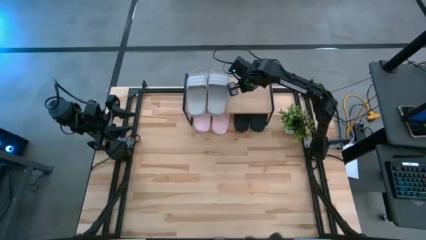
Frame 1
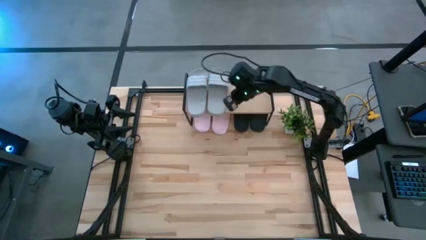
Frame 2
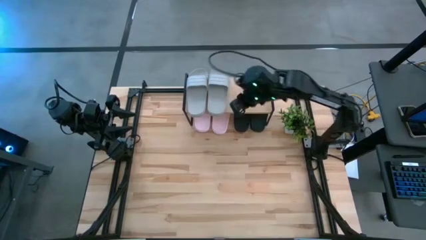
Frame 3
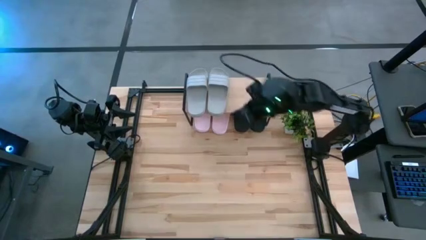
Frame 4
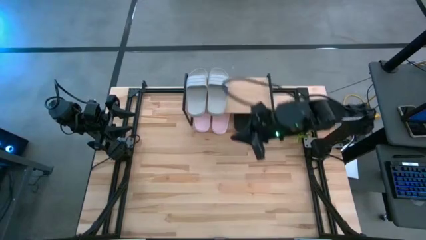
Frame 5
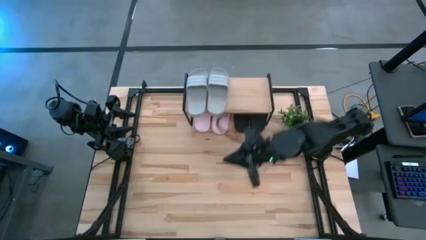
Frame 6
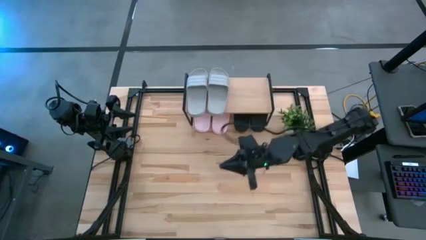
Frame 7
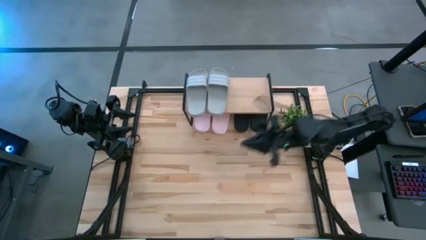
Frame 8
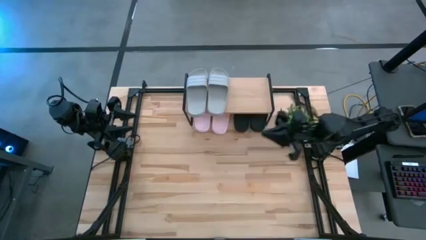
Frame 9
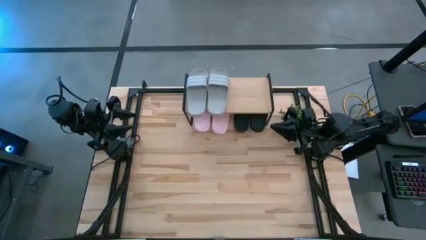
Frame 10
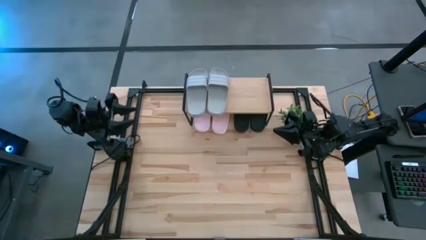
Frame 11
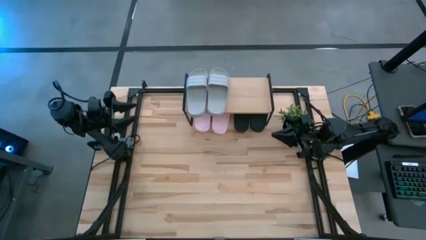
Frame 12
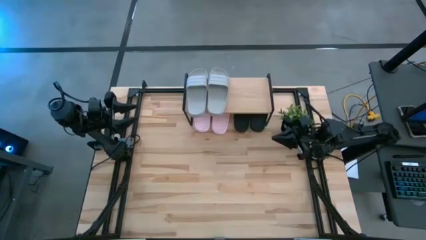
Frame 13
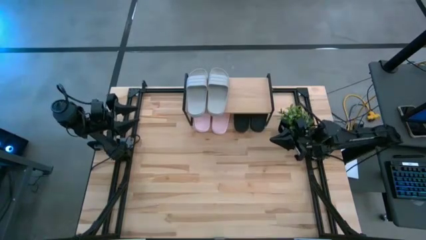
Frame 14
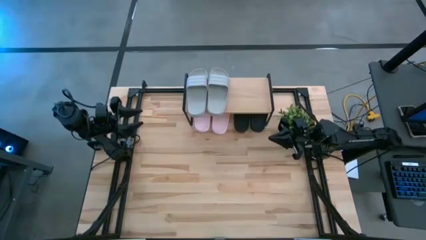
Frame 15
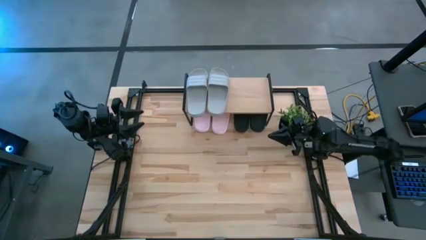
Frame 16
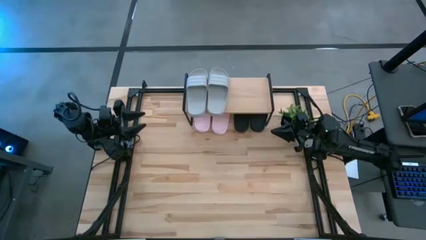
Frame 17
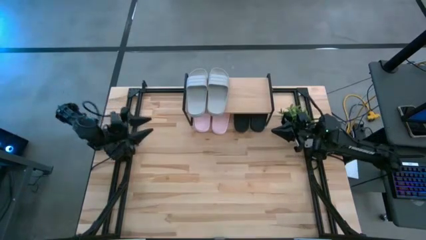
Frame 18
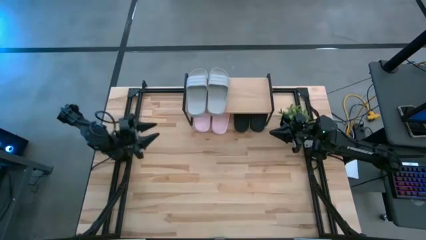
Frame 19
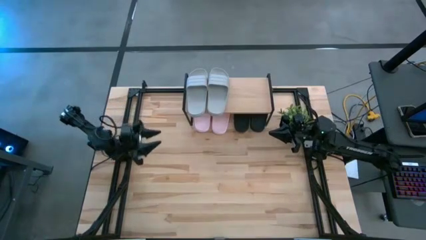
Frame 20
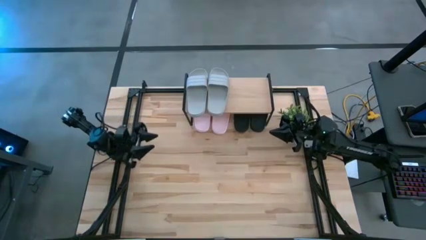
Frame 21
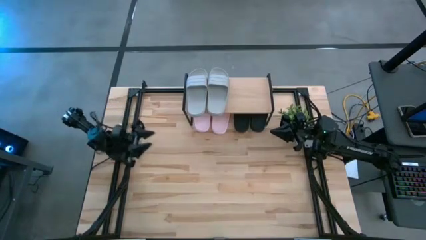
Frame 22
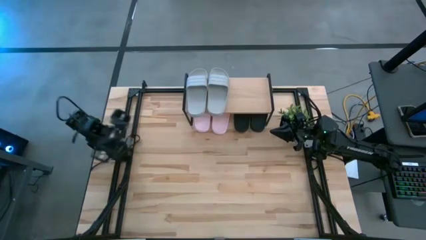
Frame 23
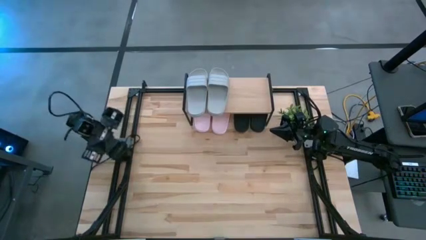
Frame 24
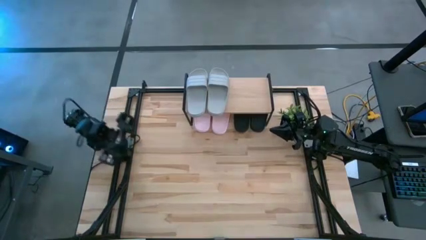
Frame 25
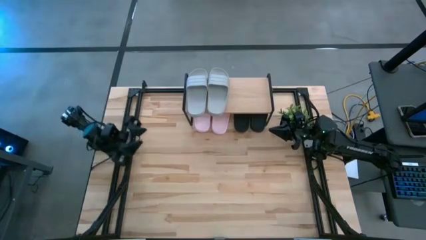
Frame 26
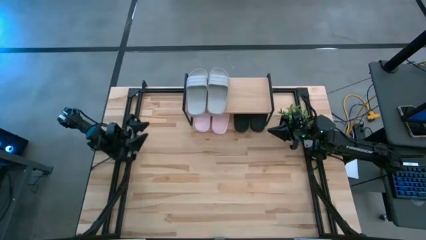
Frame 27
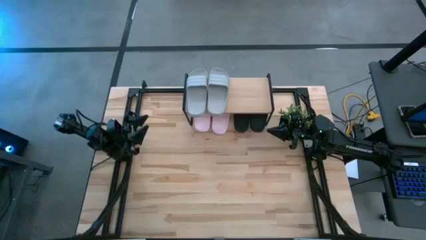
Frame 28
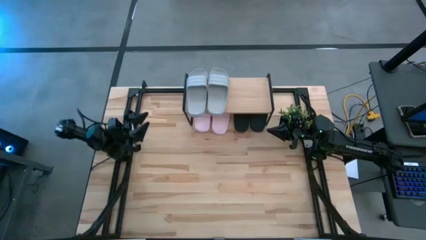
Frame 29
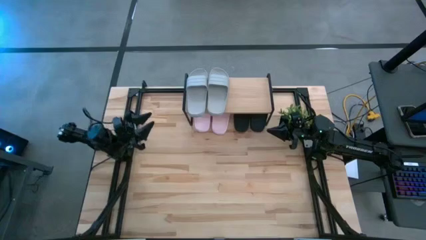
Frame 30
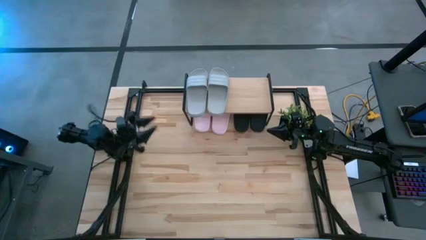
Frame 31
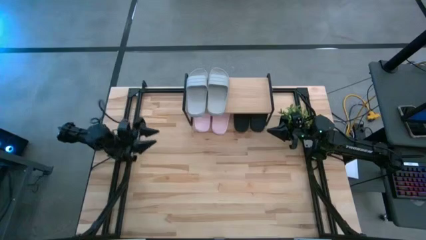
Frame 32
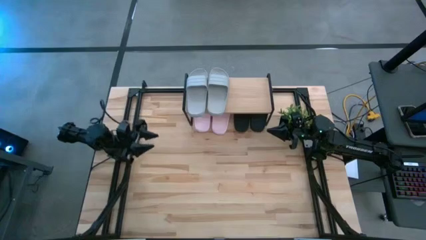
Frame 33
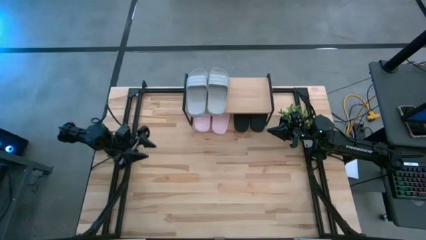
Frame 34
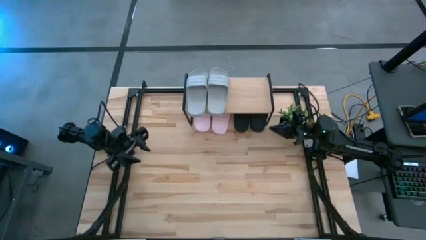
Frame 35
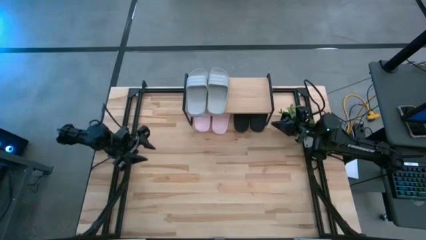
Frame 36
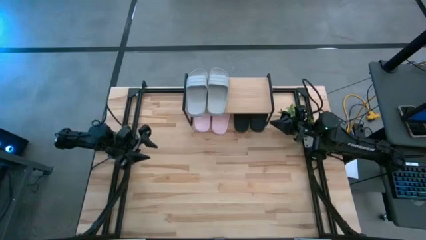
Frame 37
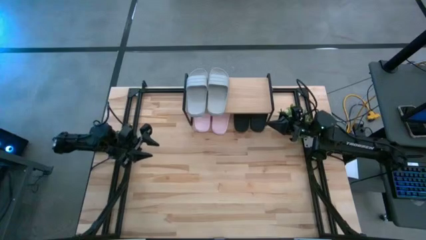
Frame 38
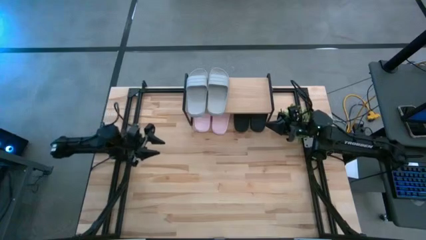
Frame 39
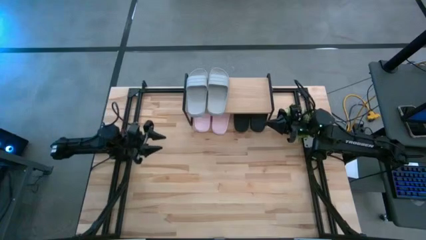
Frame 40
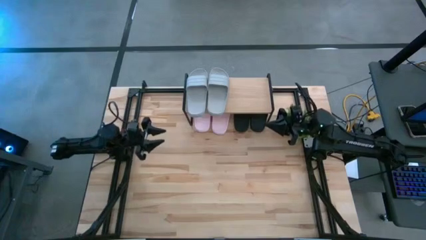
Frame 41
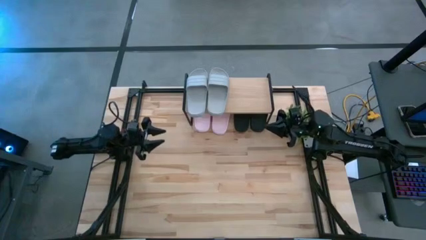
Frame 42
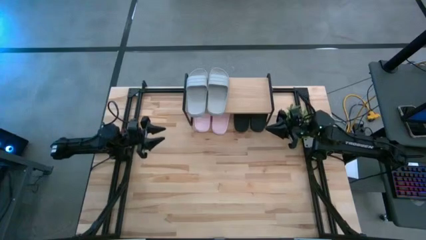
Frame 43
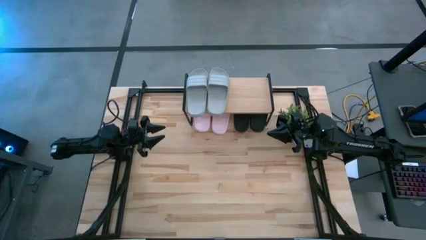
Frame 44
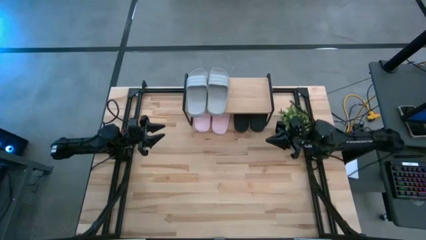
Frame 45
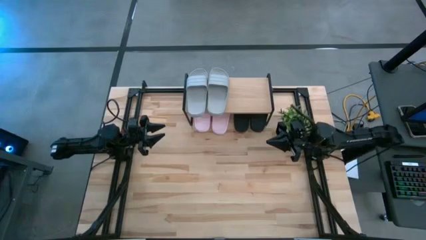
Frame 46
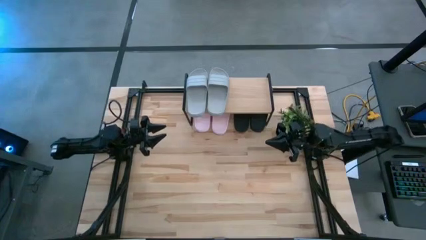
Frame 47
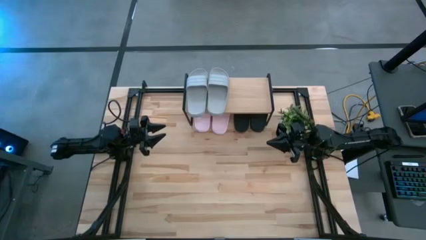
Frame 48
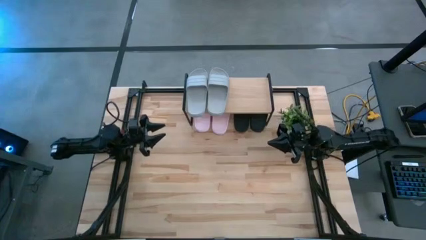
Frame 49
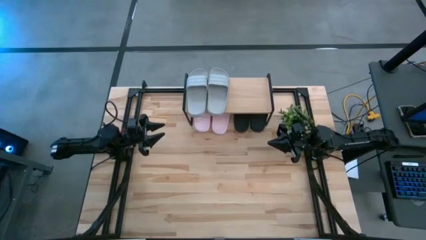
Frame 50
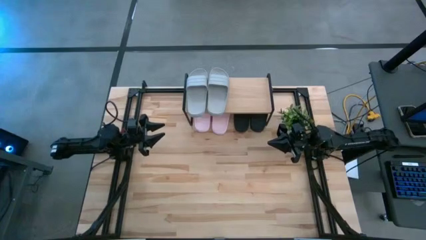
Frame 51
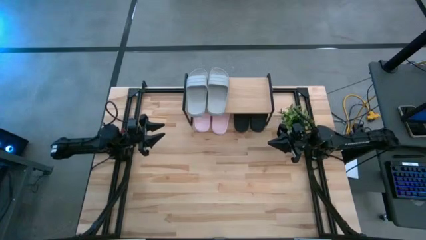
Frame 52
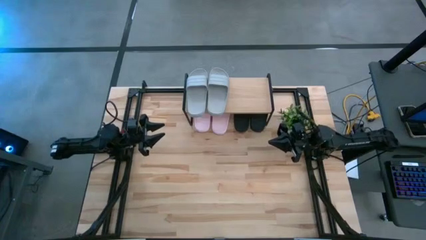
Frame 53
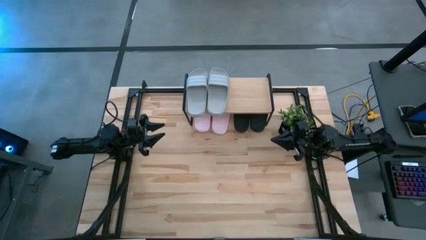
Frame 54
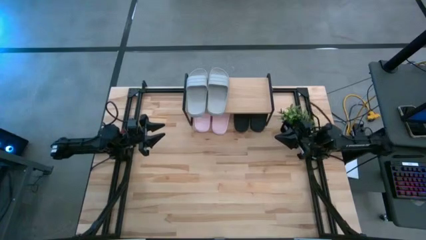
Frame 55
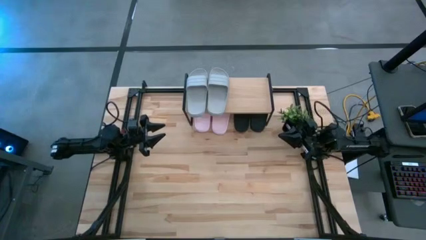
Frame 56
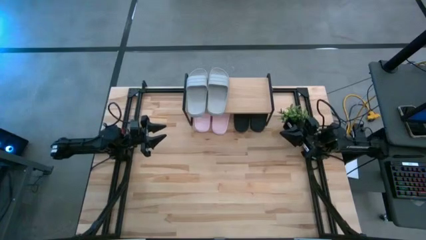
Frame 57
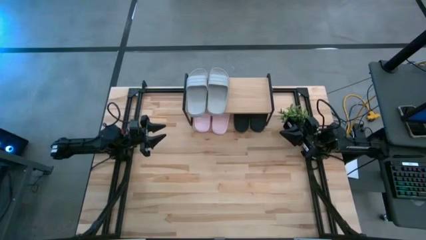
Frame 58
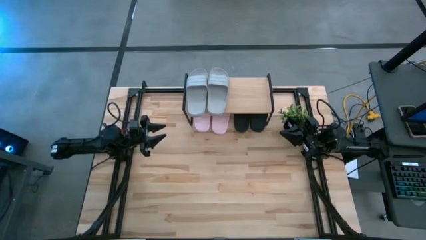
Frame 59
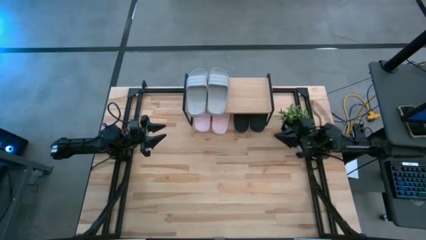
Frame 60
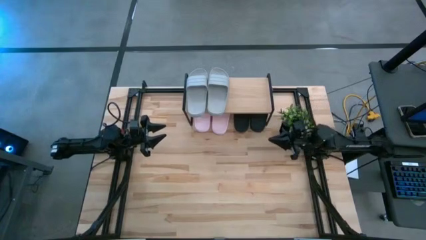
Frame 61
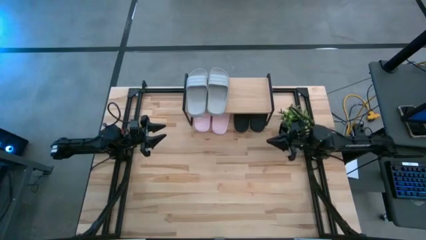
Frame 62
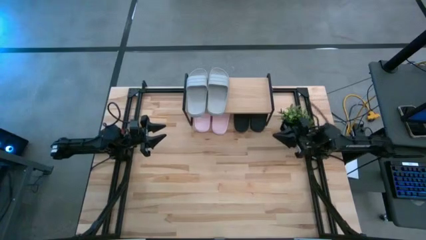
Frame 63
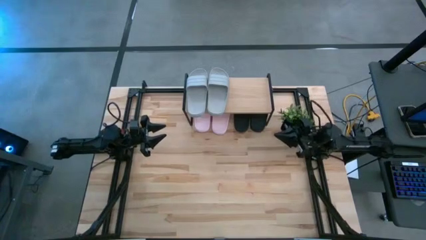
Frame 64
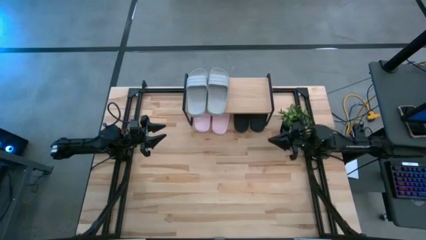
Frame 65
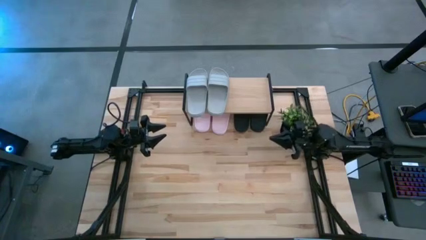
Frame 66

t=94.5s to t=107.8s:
Task: Pick and place slides into the shelf
Return to Home Position
